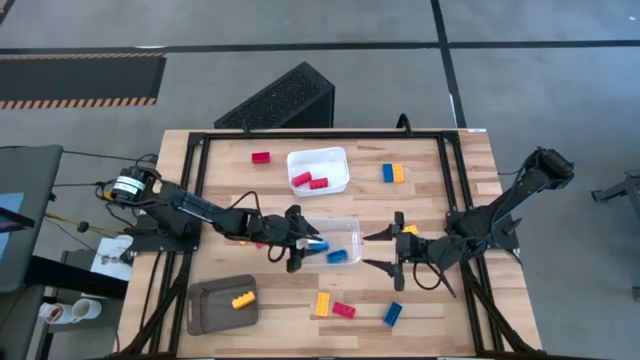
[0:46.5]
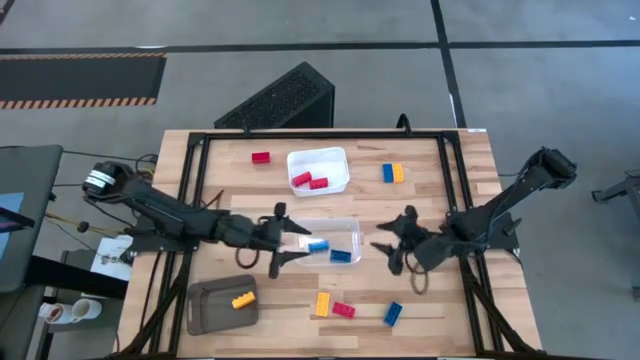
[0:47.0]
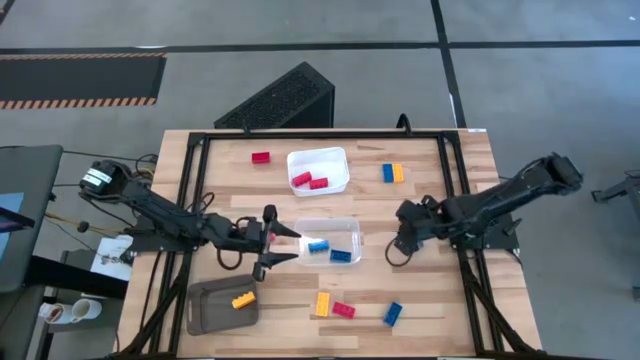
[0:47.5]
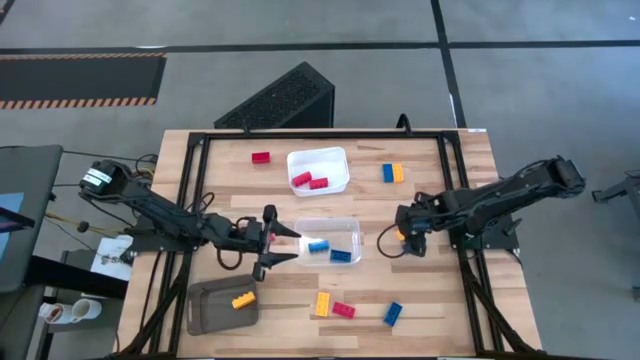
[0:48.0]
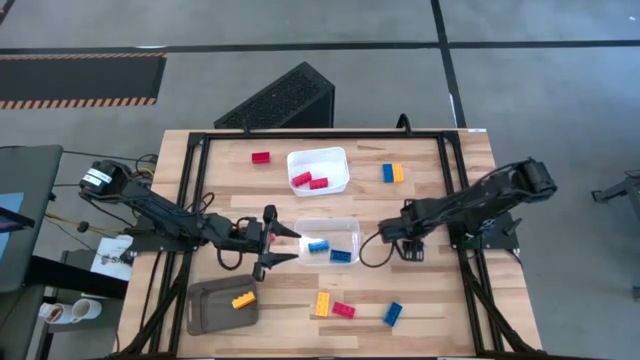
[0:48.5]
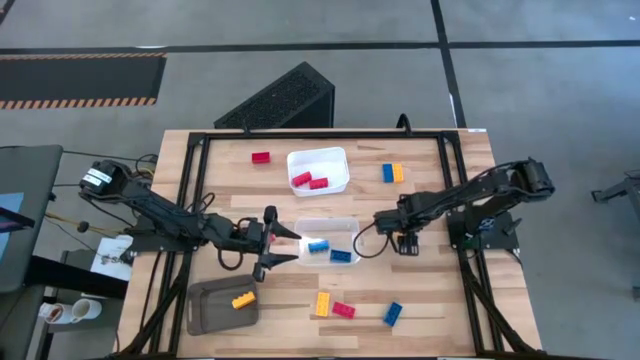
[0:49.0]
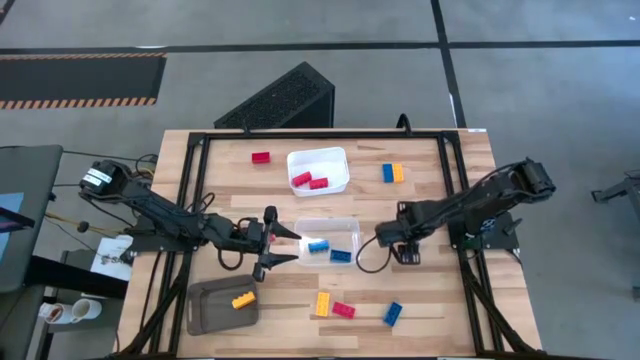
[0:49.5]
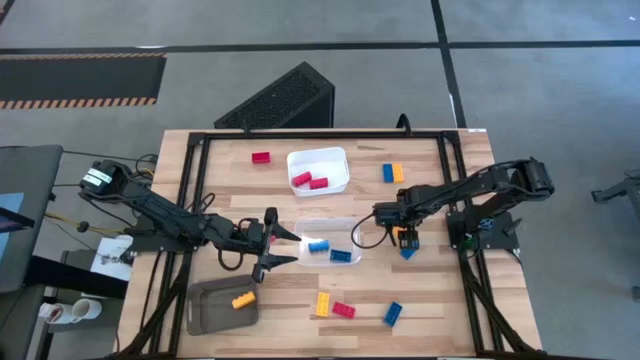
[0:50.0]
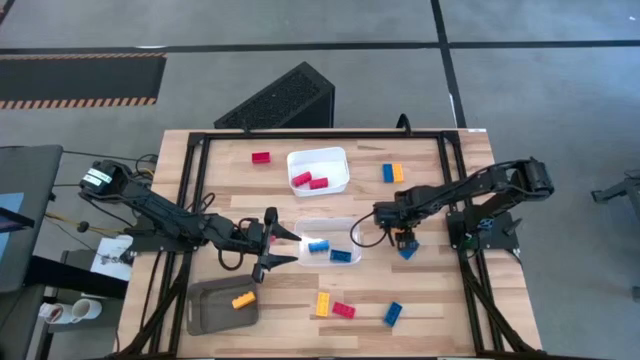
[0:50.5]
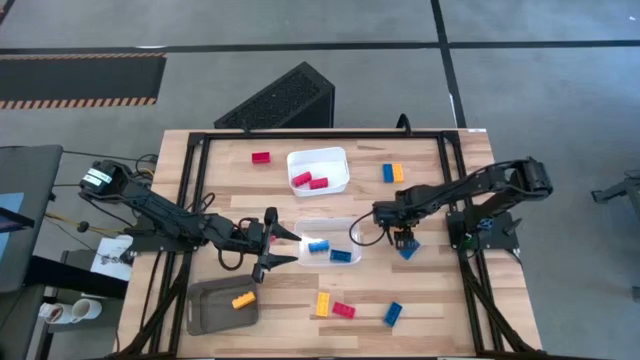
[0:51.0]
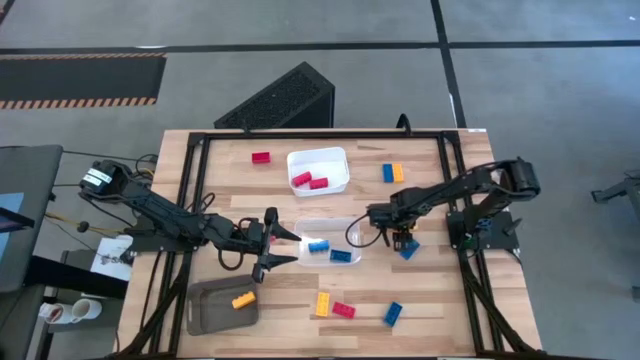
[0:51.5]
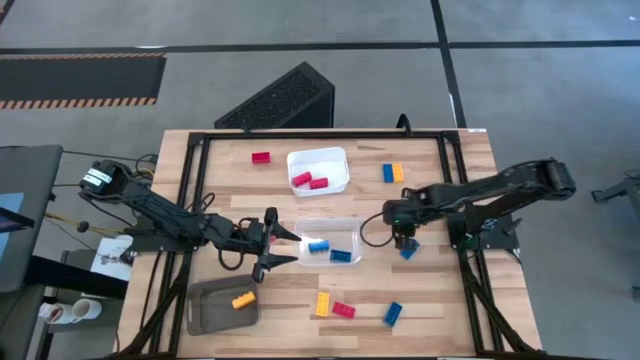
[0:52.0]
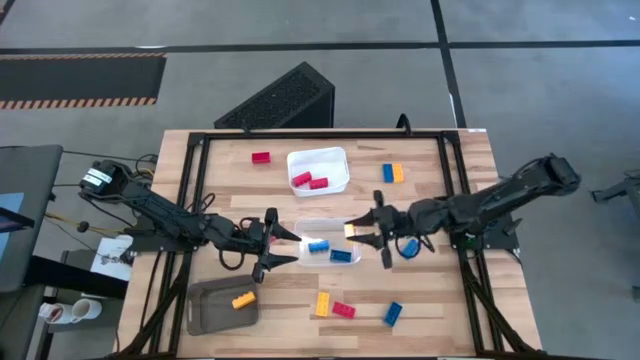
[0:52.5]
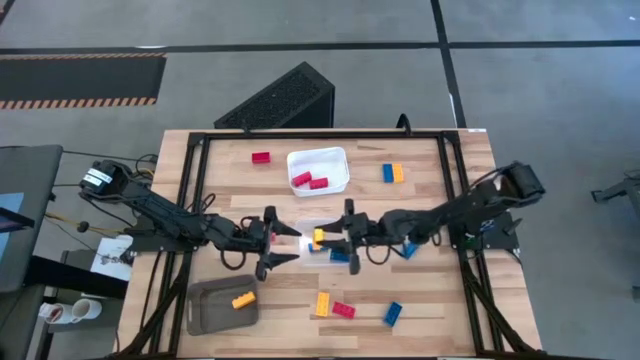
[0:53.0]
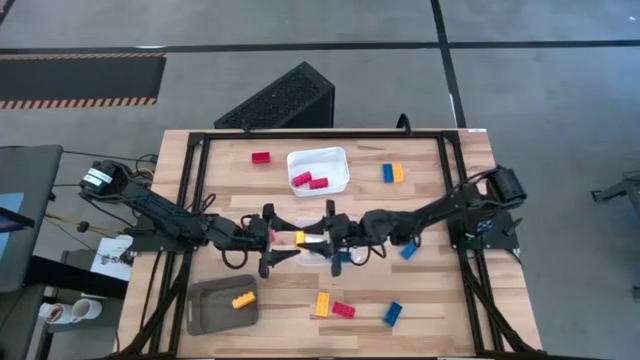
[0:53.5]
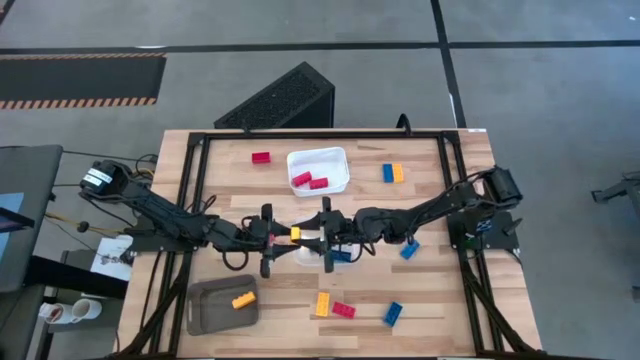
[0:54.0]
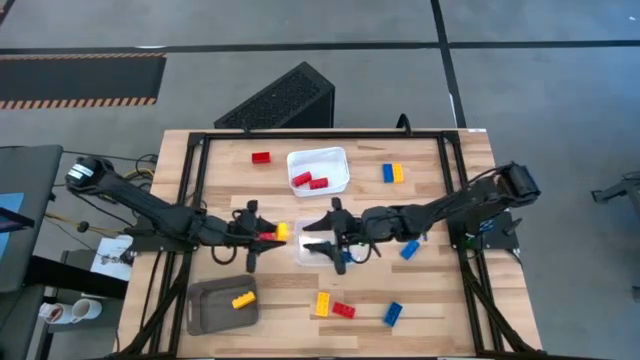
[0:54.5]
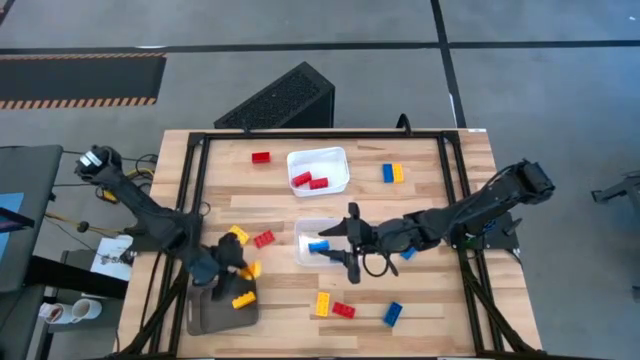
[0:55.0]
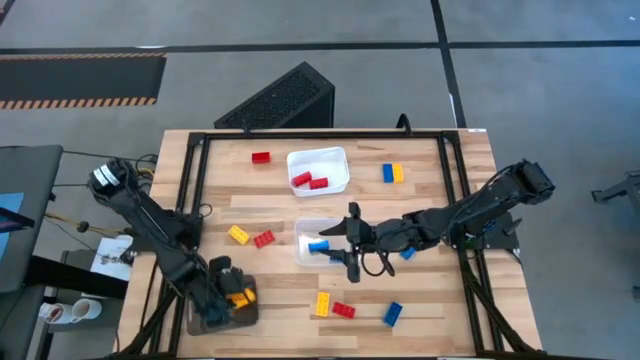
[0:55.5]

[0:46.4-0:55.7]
Task: Sort & place blocks by color
Put the yellow game piece into the black bin

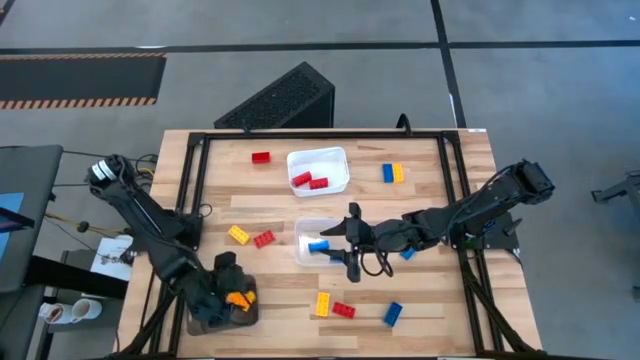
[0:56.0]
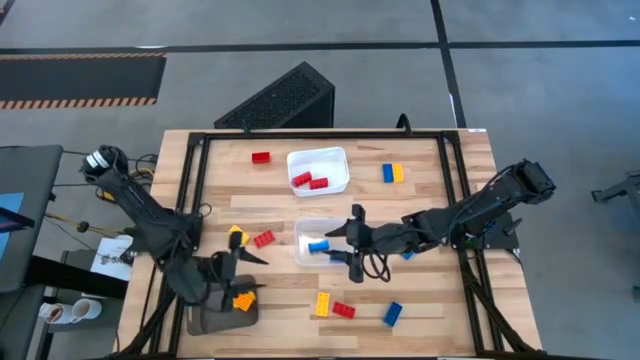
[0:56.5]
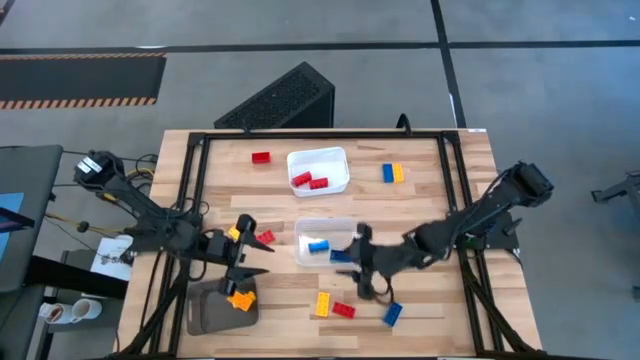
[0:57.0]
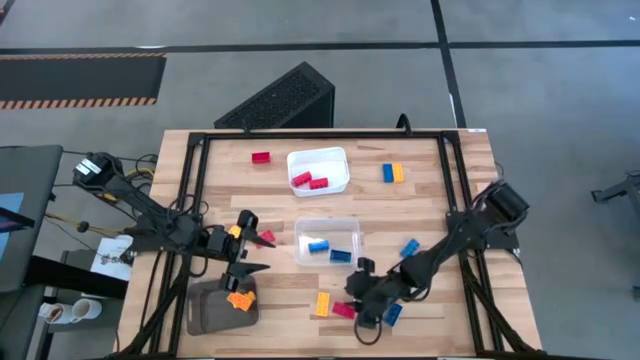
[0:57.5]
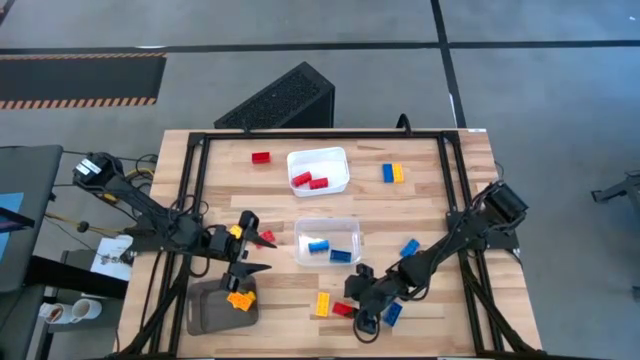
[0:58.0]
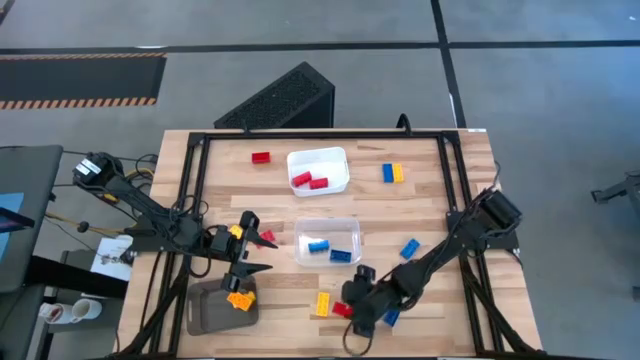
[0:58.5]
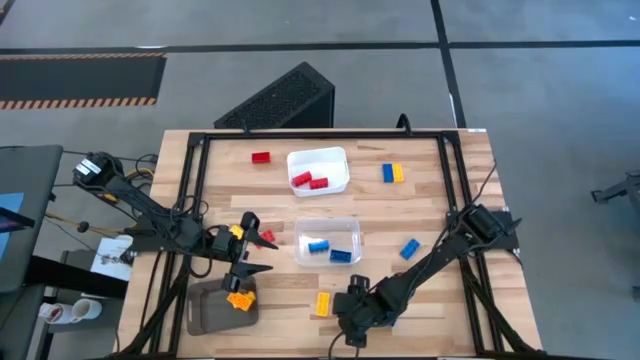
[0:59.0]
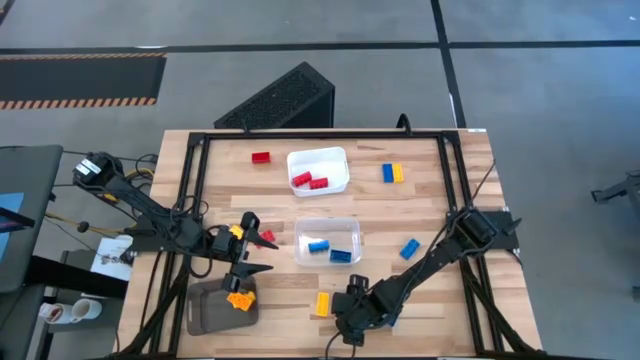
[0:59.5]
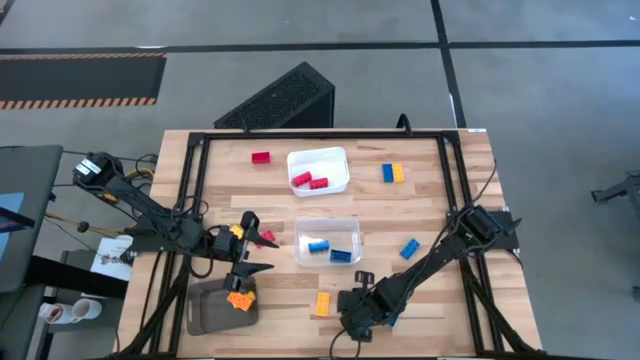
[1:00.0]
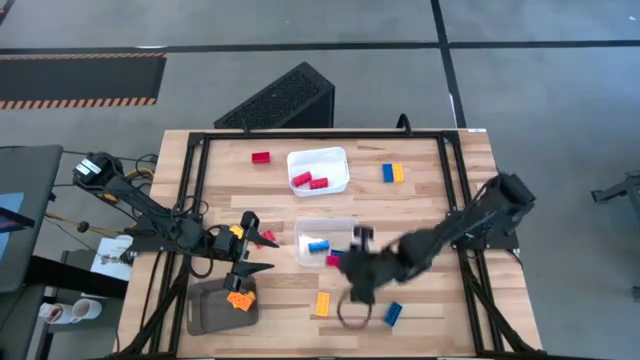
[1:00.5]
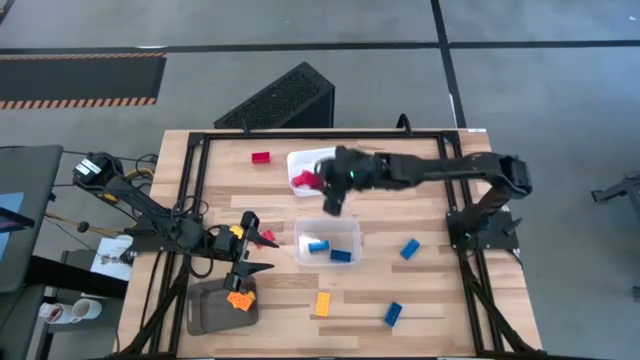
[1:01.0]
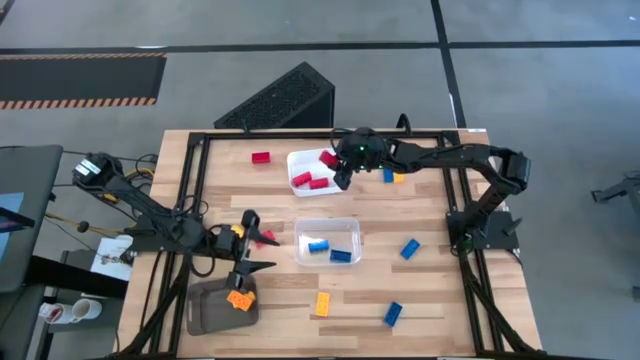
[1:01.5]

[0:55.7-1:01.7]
Put the red game piece into the white bin

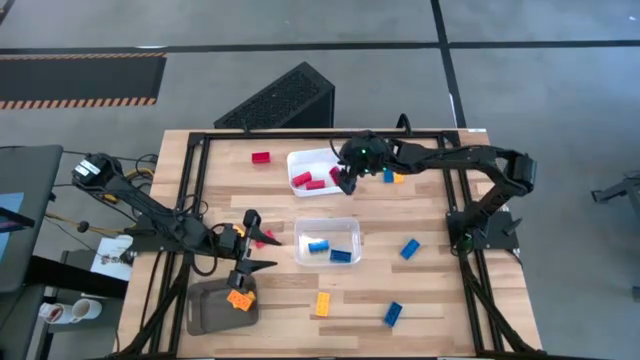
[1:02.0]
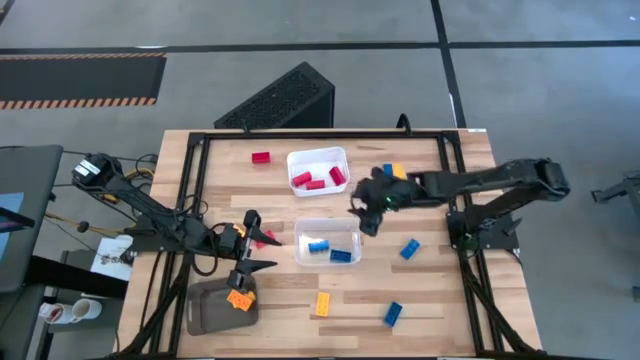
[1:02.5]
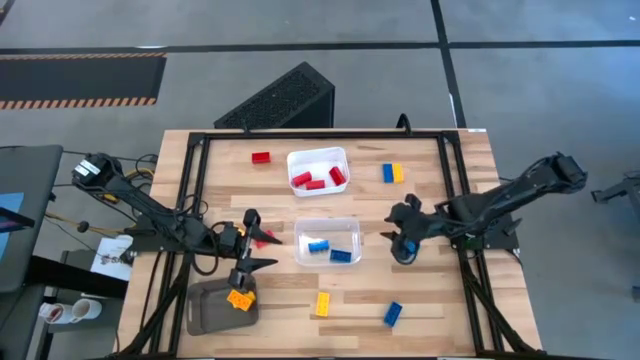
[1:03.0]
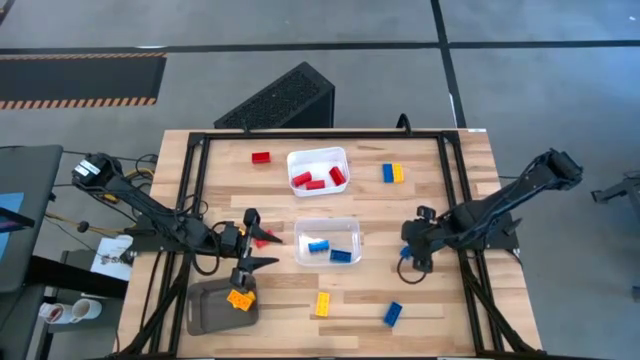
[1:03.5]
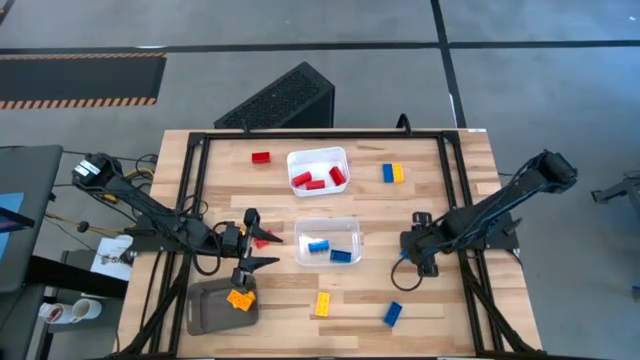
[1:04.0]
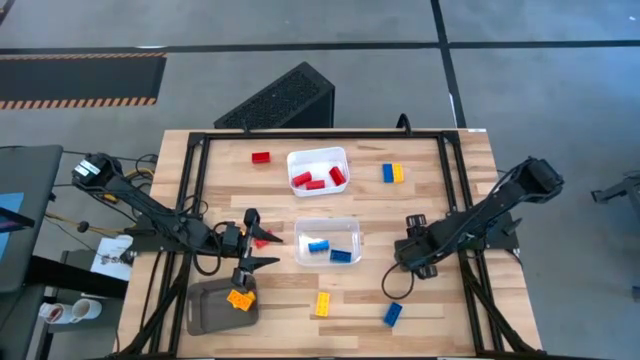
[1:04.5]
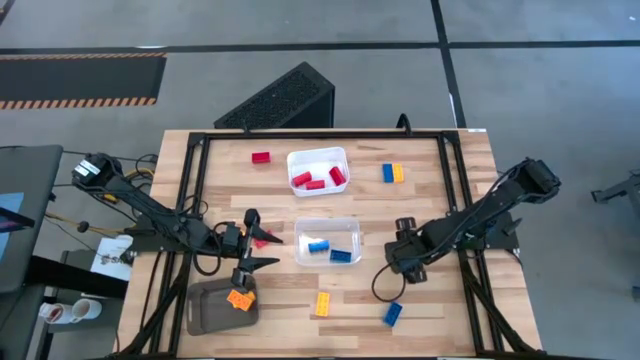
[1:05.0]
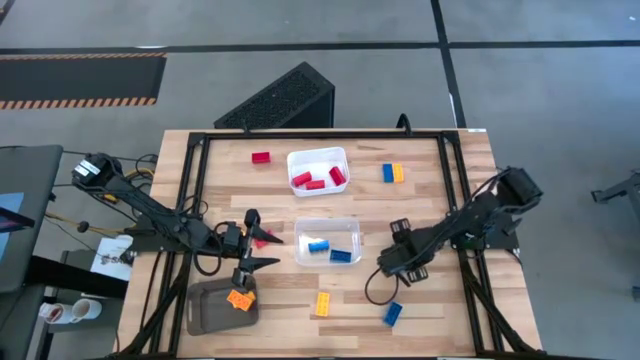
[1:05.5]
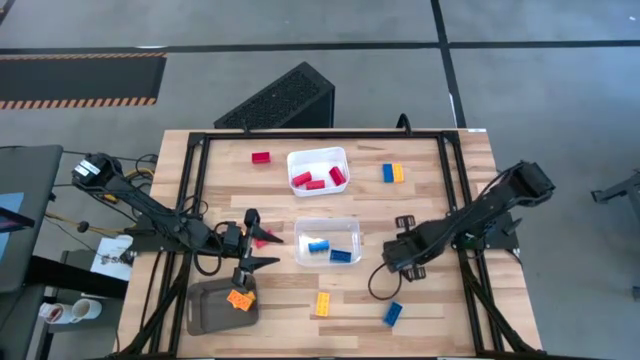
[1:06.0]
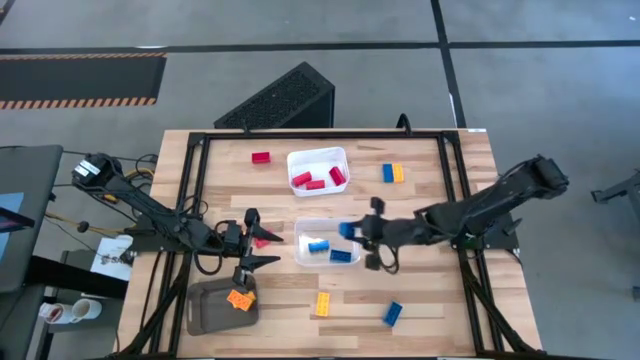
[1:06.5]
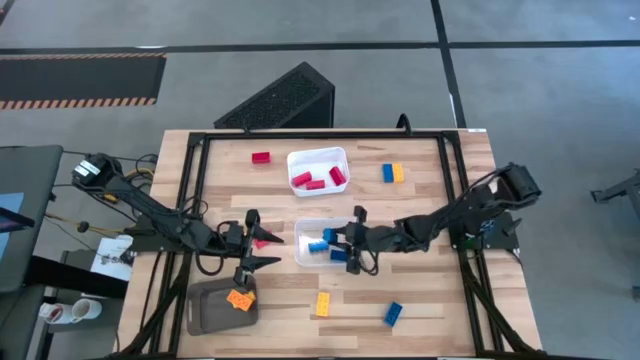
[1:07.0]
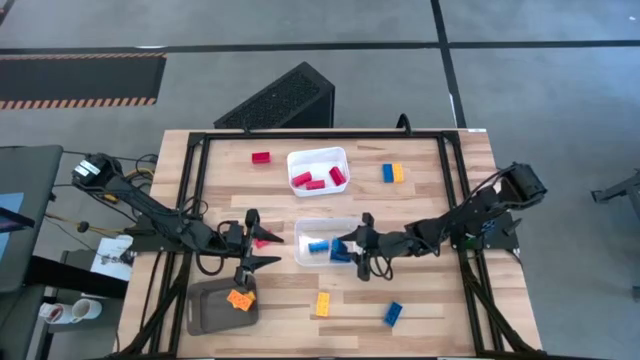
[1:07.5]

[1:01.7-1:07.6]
Put the blue game piece into the transparent bin
